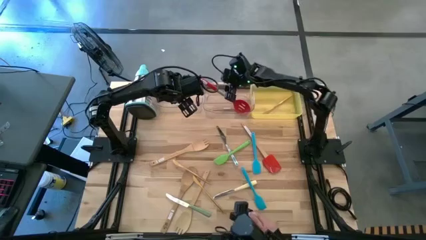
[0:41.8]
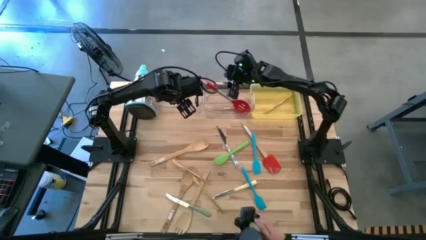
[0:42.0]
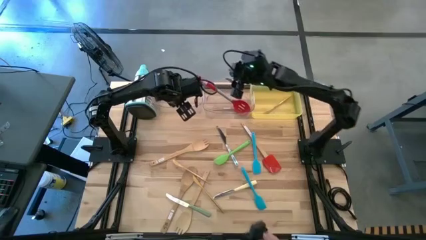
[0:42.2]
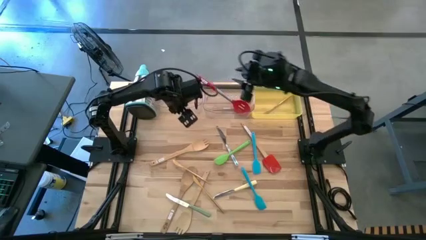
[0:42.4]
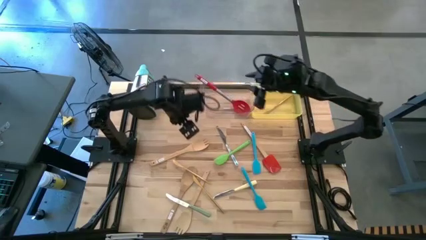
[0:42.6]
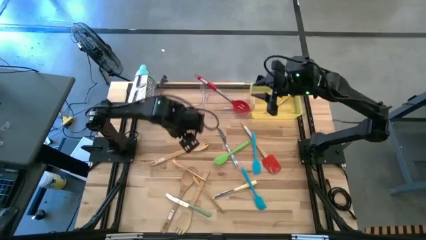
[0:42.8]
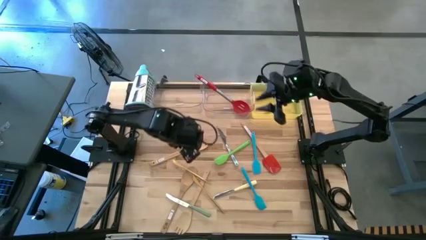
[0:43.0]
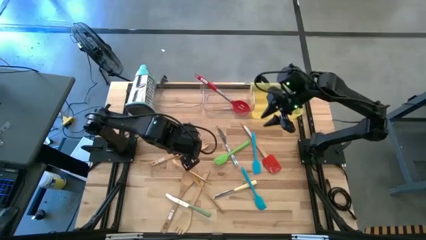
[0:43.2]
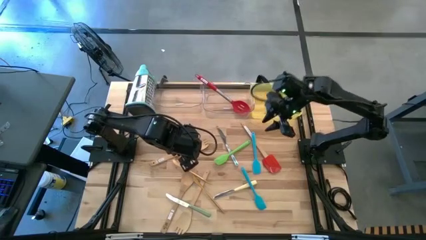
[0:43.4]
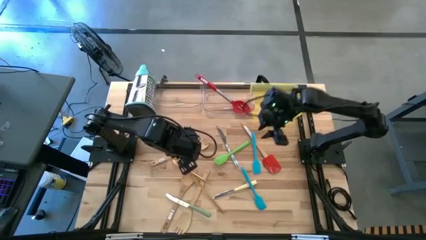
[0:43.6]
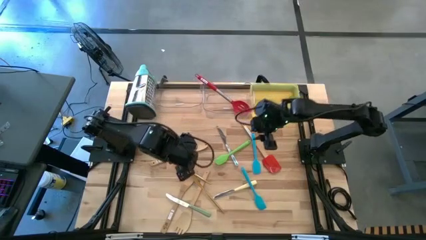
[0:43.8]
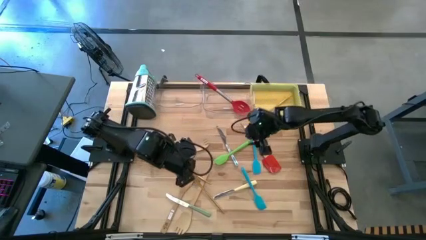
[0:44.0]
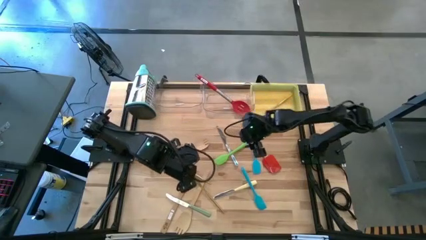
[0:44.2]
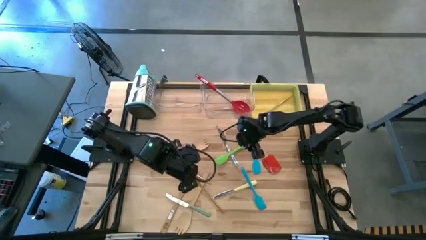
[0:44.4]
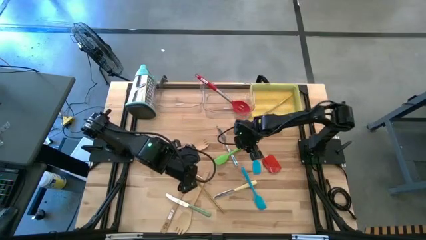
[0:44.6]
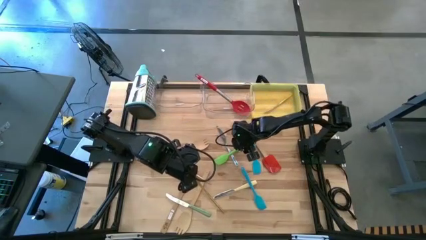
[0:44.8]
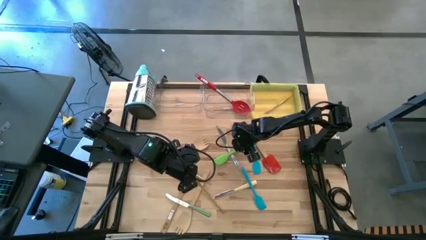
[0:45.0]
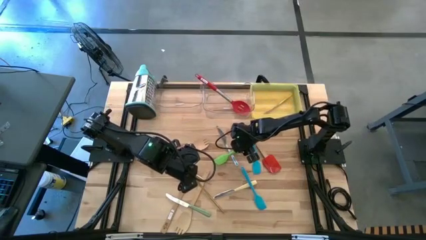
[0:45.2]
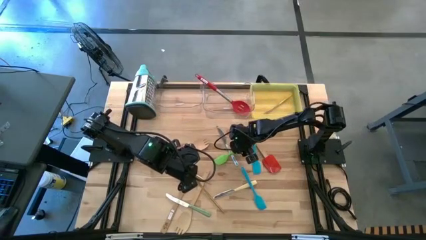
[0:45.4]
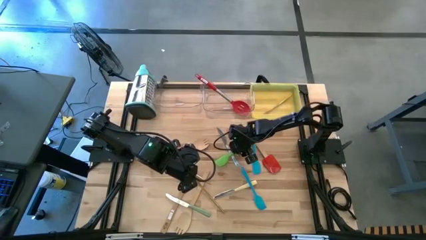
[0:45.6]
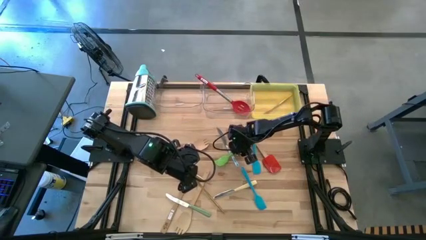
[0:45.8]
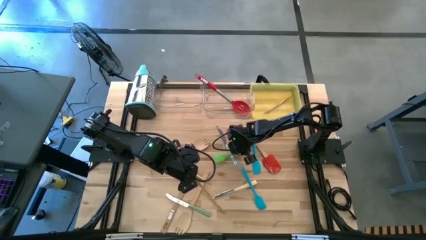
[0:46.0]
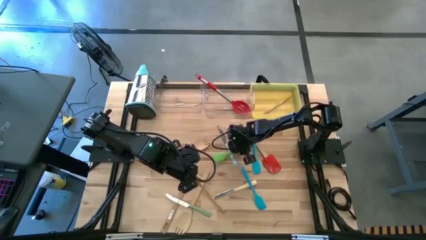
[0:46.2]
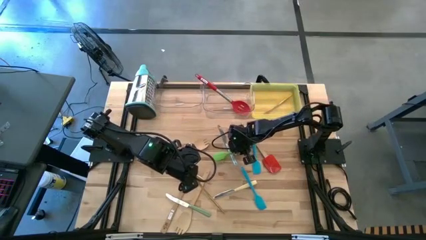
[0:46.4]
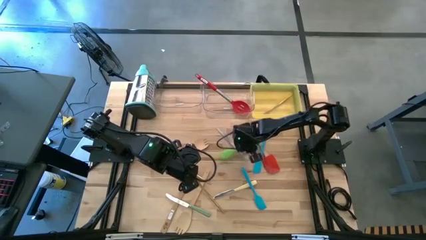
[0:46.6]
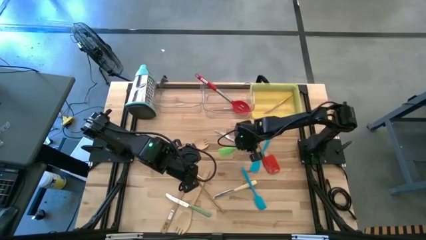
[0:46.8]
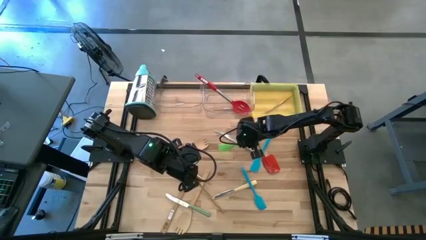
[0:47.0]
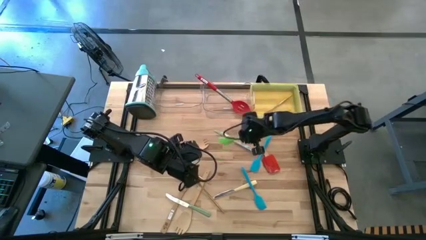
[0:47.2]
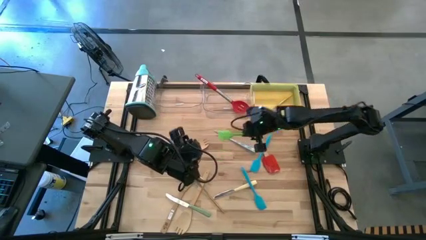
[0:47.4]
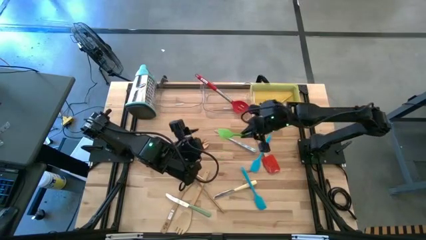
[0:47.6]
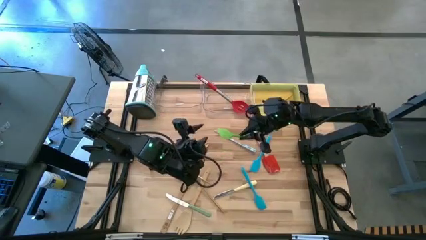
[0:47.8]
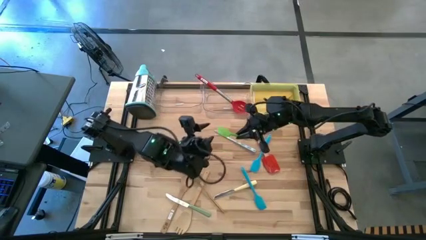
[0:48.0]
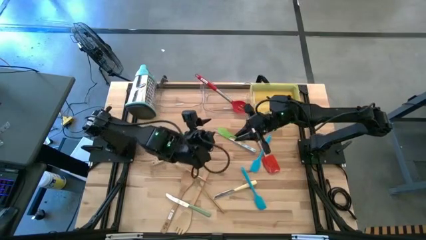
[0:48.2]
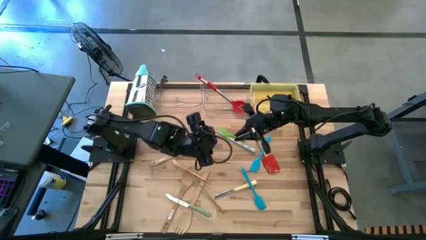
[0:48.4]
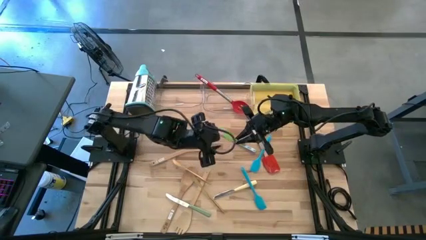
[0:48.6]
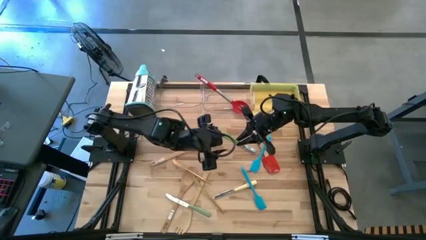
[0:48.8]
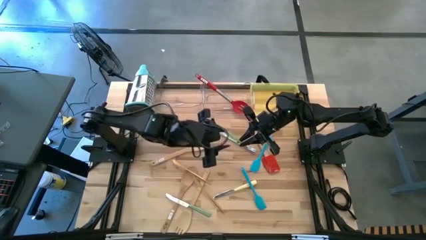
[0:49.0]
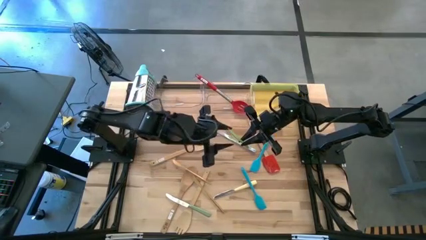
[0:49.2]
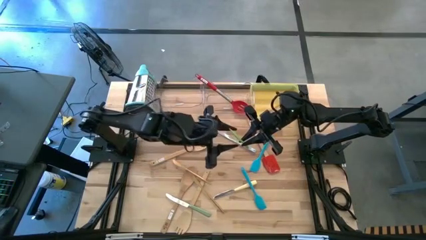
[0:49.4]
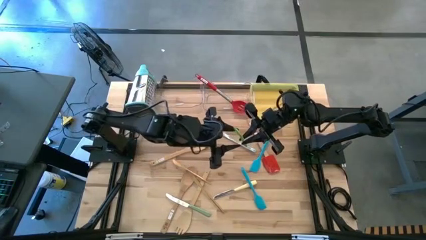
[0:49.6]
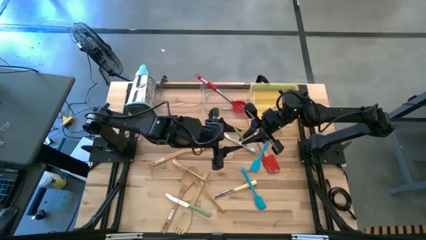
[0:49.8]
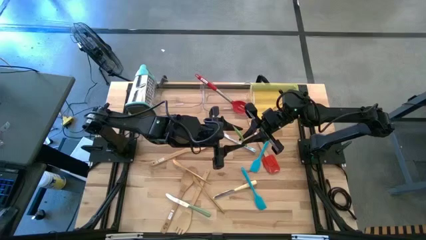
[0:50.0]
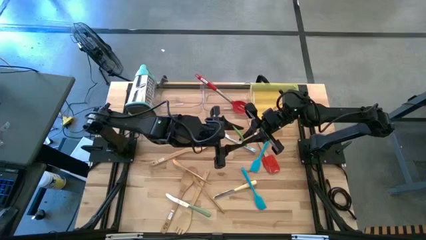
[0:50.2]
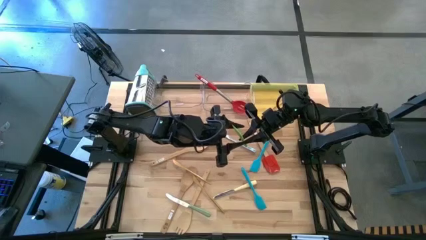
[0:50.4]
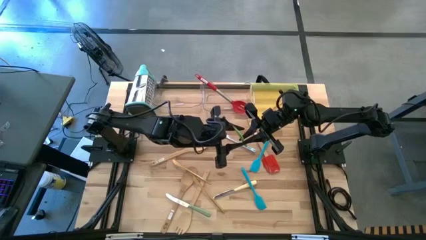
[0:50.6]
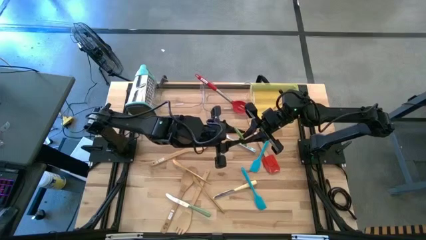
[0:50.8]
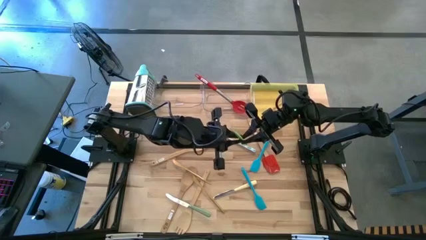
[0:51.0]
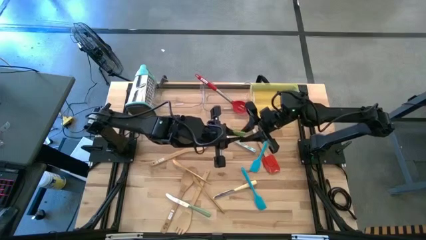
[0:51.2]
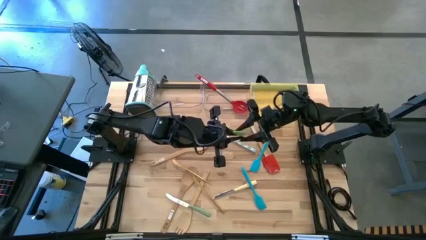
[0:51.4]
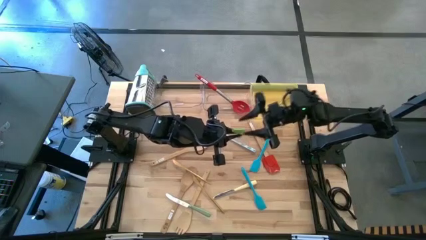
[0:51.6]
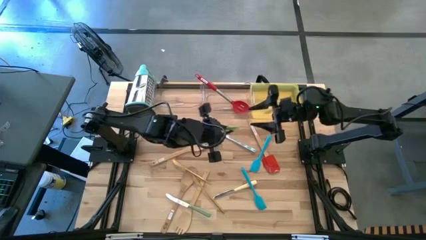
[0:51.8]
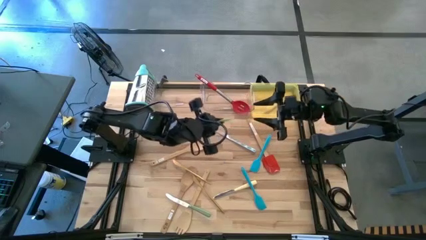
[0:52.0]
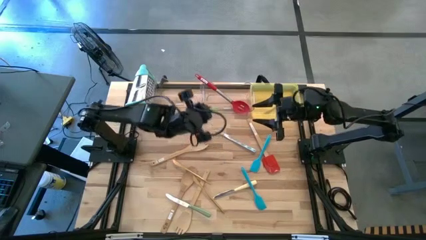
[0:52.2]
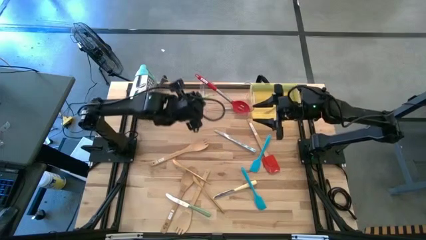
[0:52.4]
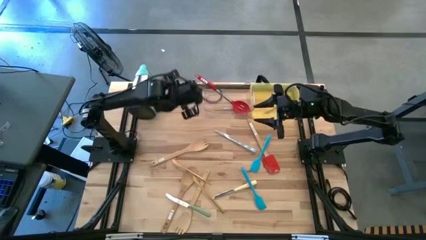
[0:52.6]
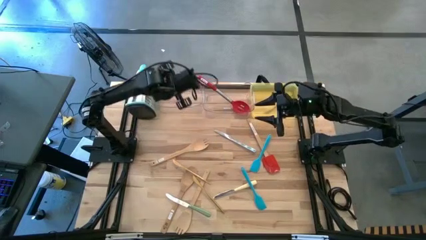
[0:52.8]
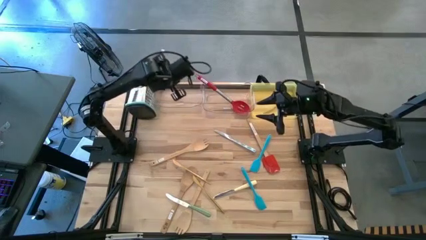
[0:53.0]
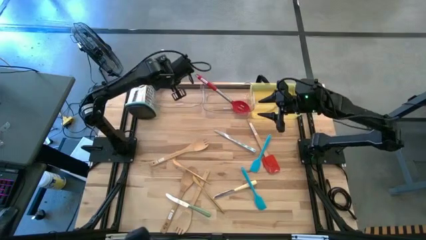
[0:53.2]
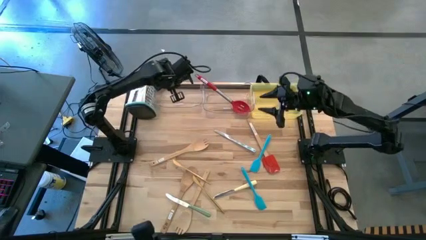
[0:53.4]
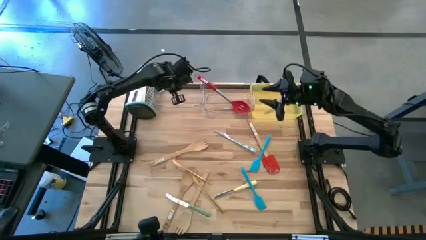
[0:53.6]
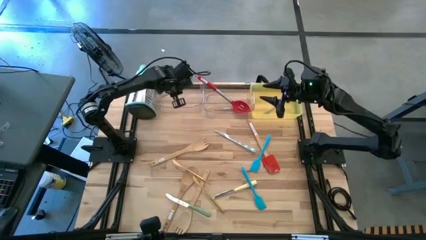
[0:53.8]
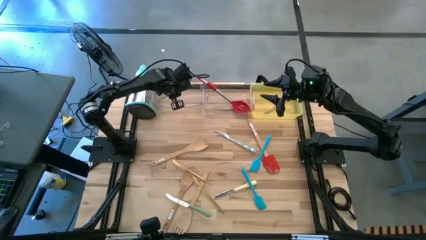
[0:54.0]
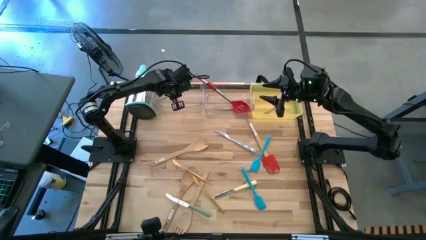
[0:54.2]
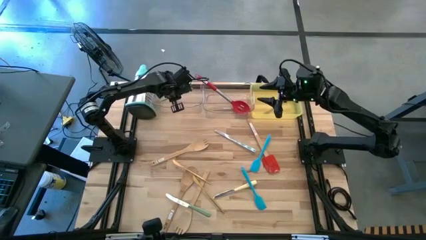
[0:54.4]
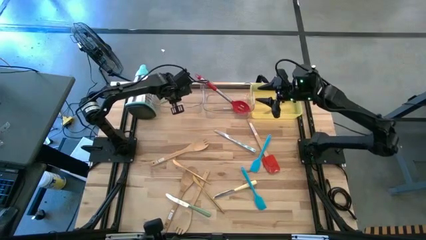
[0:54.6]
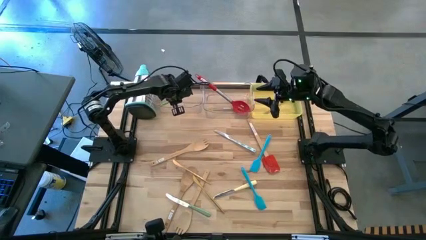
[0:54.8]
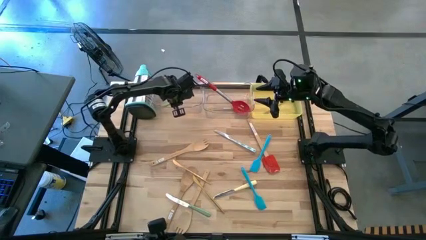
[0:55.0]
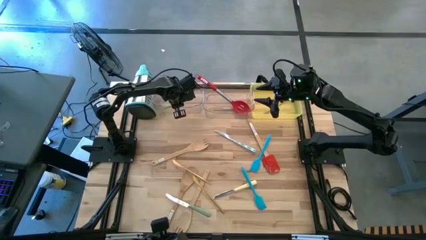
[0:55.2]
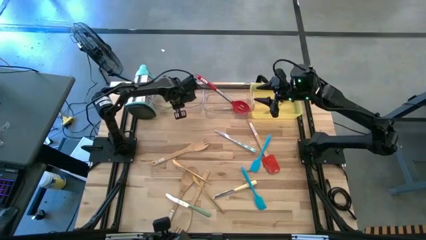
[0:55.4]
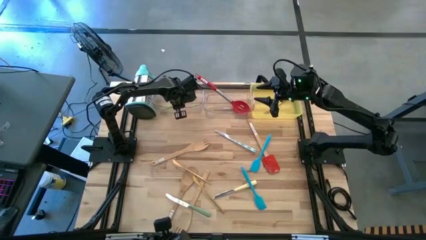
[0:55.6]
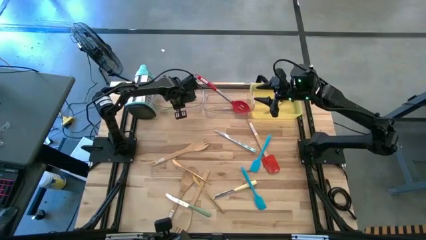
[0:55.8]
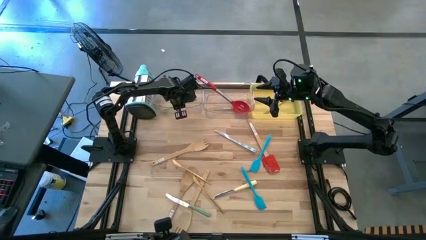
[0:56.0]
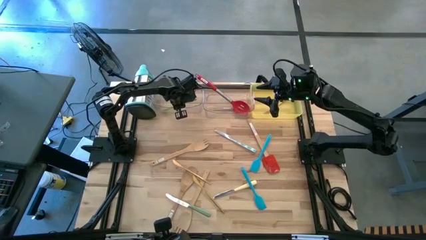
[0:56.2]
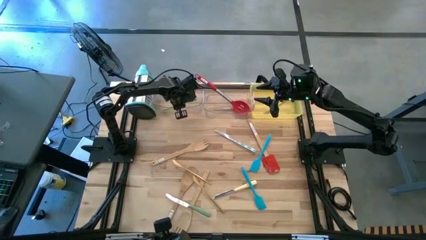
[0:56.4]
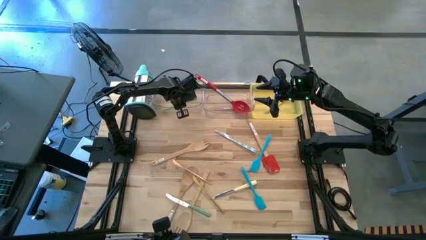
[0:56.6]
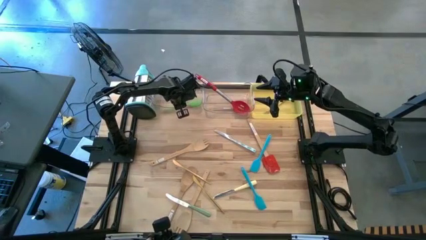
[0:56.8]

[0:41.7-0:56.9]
Task: Pick & Place Kitchen Items
Put the green spatula into the left transparent bin

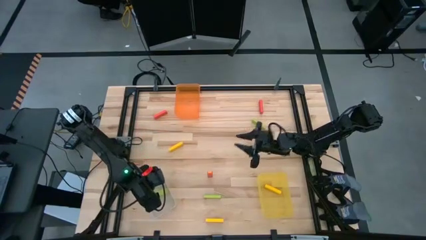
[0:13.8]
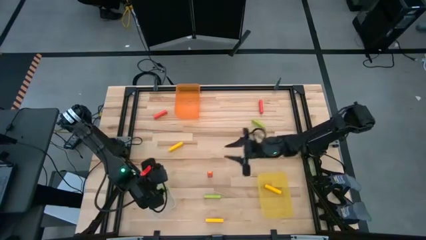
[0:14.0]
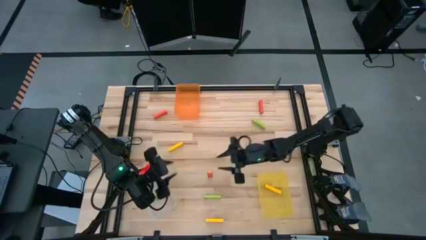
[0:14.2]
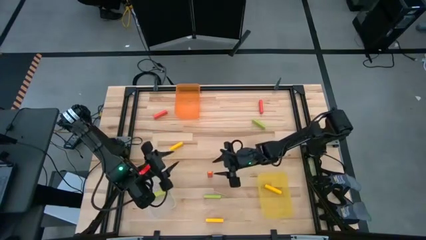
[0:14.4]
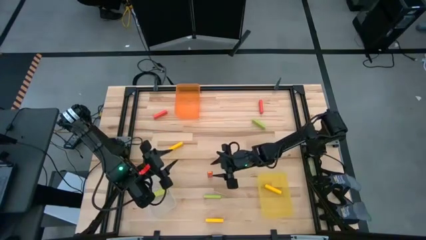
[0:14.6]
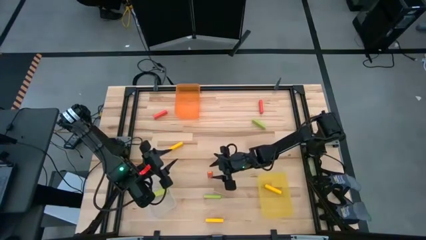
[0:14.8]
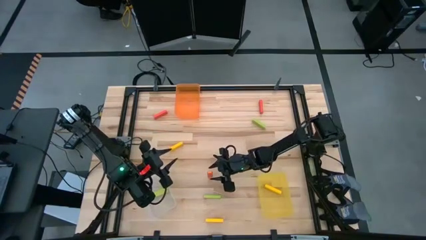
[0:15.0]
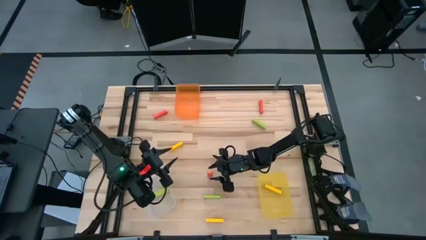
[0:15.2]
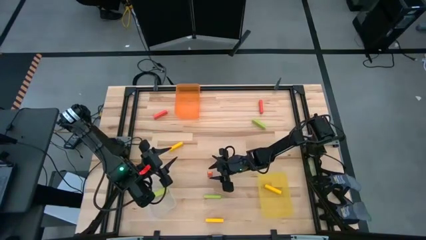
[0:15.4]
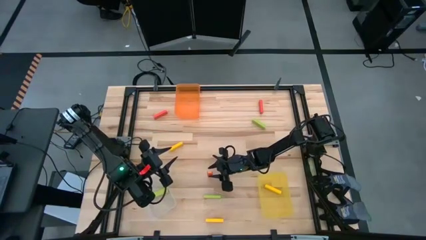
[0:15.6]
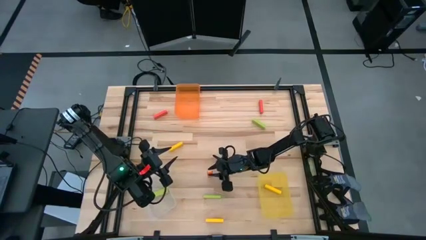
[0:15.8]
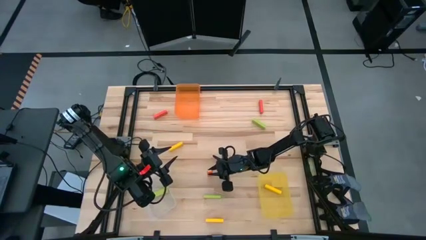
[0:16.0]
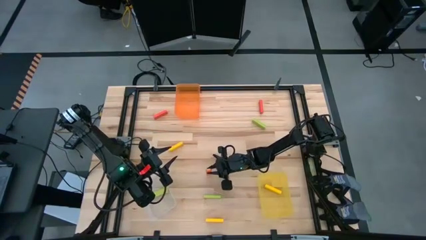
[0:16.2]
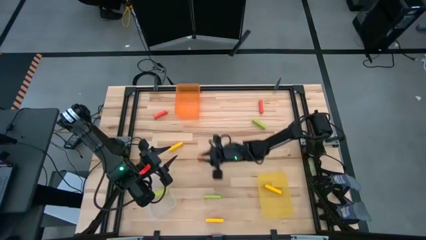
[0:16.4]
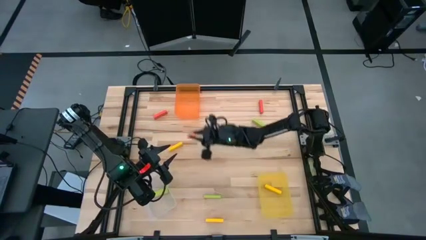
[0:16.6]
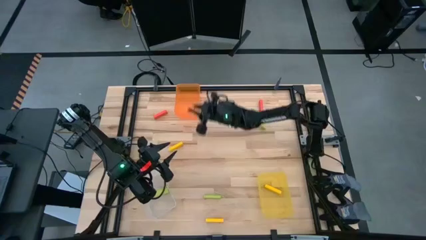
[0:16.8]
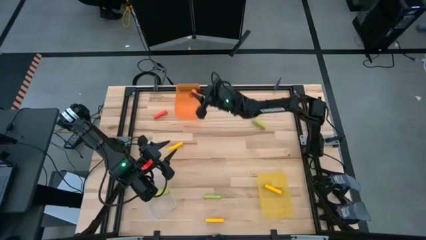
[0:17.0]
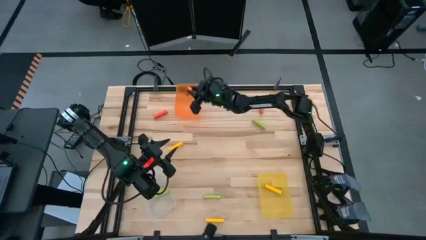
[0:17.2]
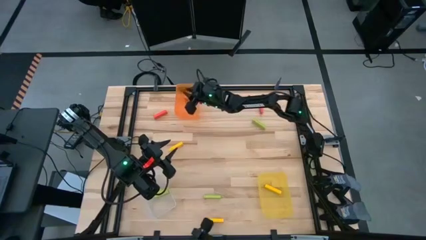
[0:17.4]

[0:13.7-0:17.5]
Task: Sort blocks
Put the bottom red block into the orange bin
